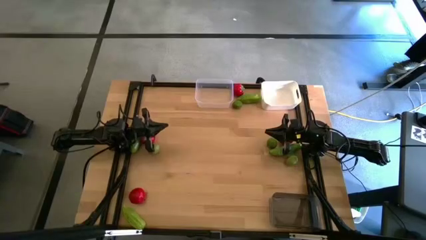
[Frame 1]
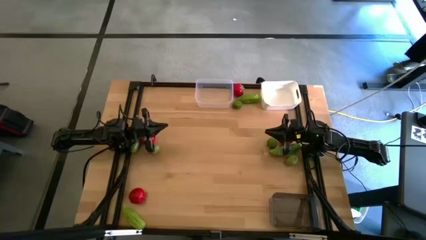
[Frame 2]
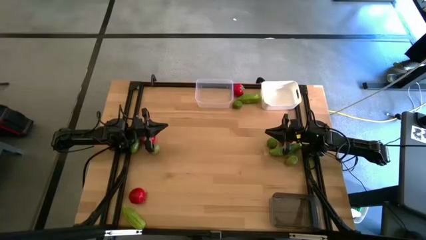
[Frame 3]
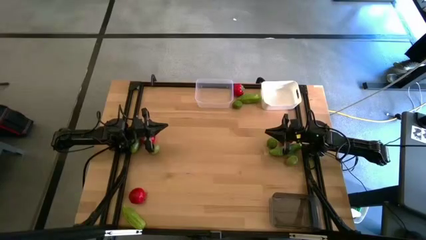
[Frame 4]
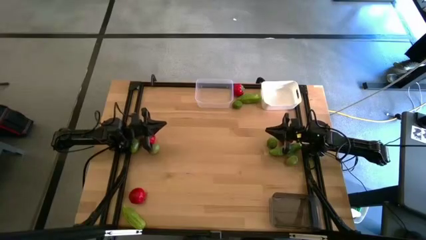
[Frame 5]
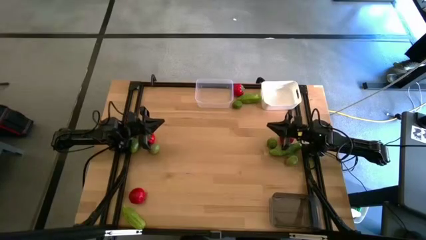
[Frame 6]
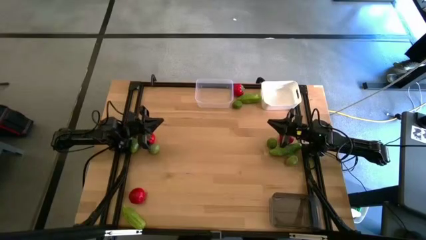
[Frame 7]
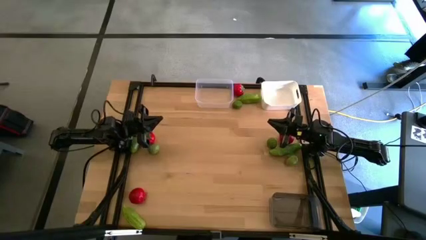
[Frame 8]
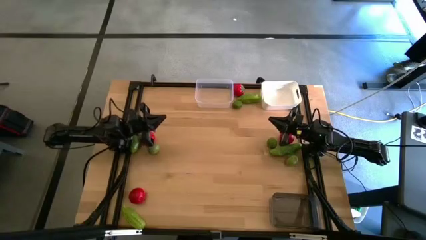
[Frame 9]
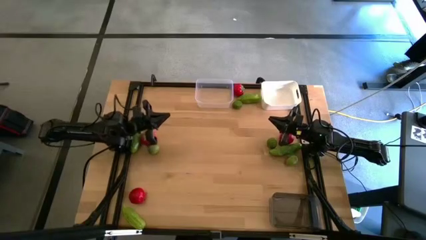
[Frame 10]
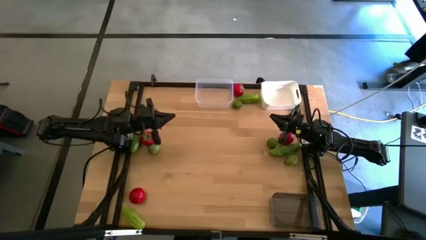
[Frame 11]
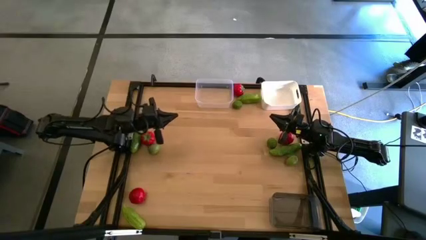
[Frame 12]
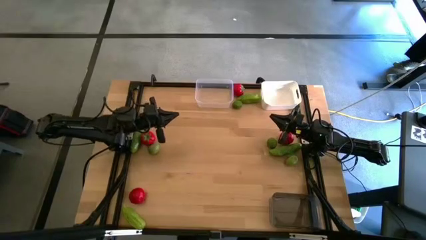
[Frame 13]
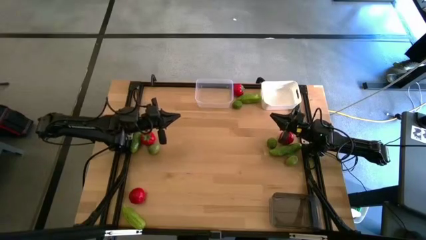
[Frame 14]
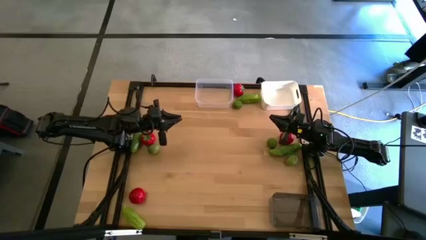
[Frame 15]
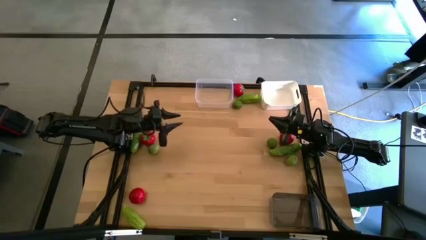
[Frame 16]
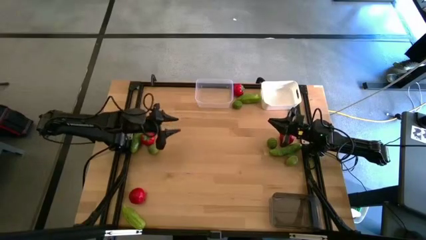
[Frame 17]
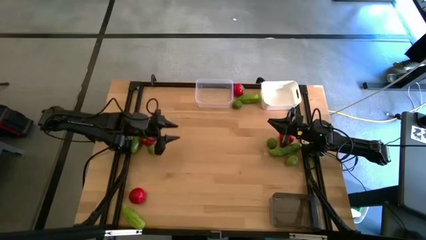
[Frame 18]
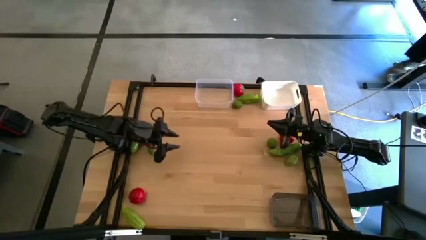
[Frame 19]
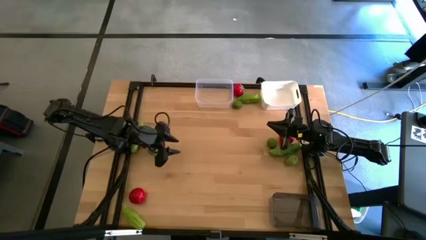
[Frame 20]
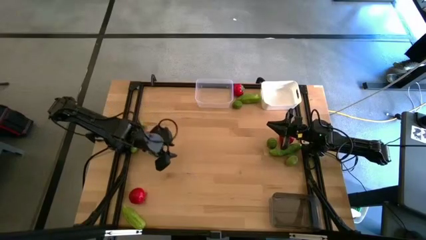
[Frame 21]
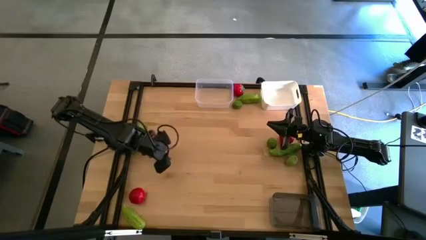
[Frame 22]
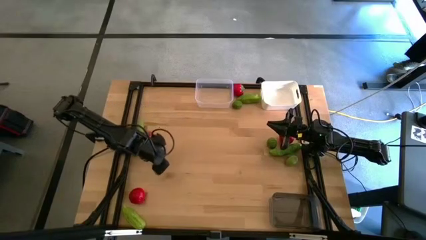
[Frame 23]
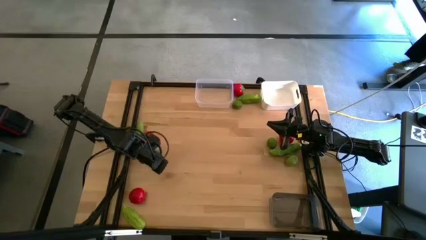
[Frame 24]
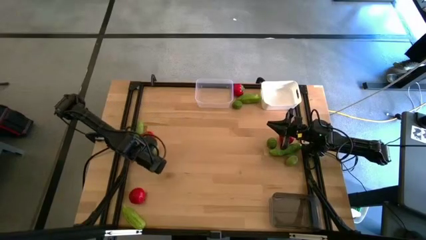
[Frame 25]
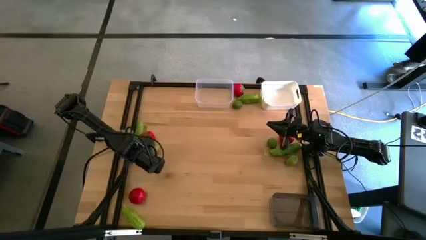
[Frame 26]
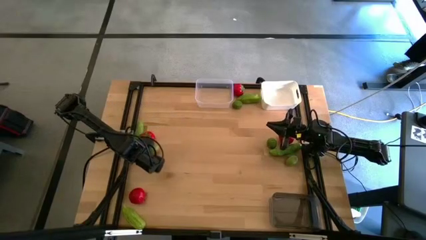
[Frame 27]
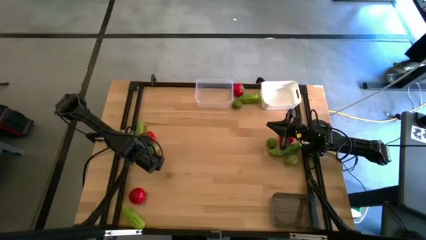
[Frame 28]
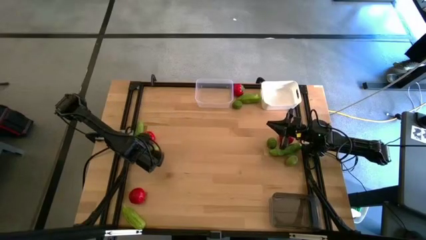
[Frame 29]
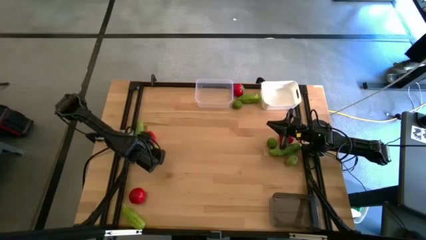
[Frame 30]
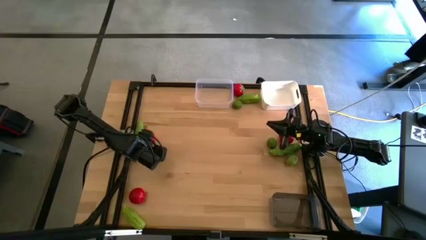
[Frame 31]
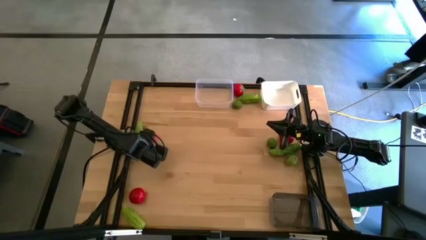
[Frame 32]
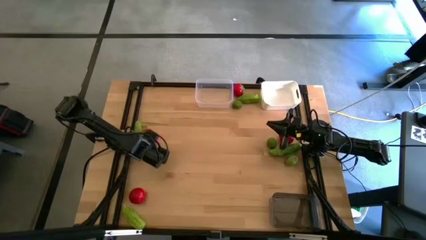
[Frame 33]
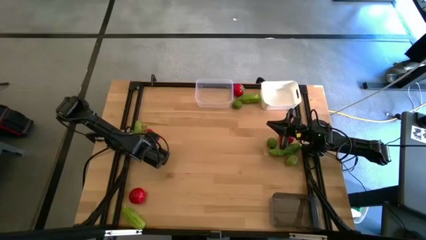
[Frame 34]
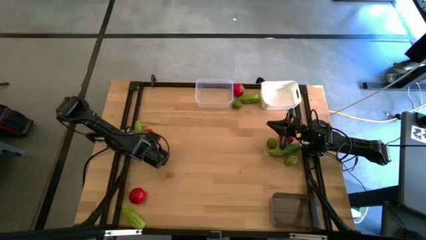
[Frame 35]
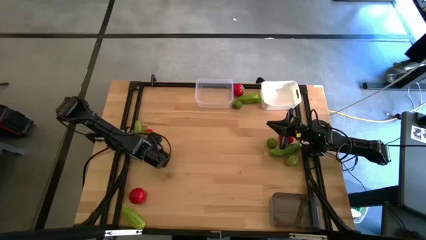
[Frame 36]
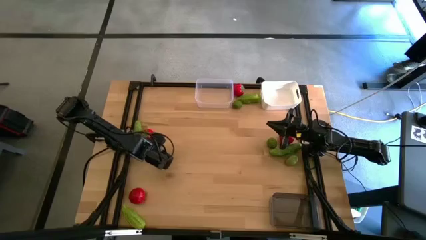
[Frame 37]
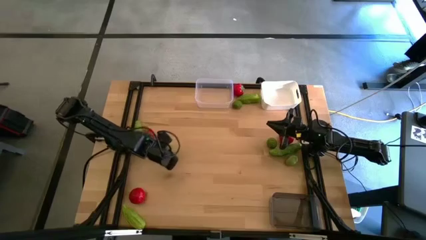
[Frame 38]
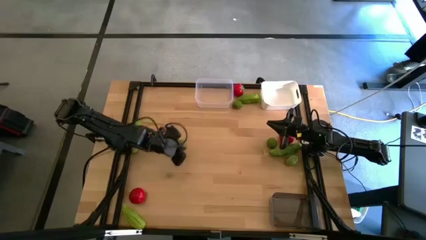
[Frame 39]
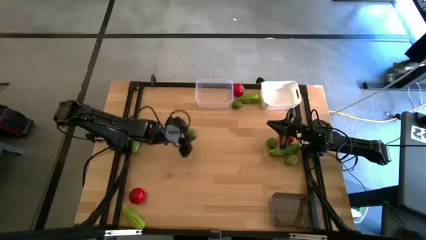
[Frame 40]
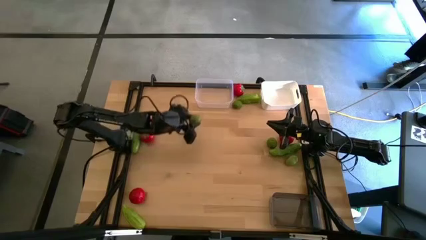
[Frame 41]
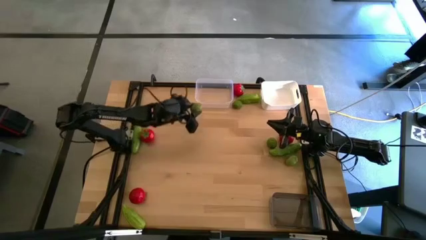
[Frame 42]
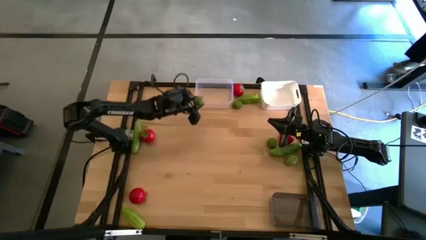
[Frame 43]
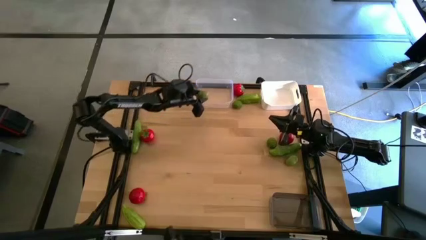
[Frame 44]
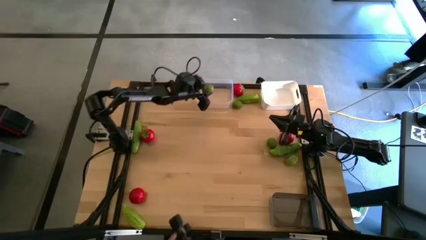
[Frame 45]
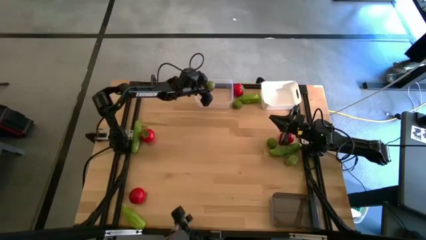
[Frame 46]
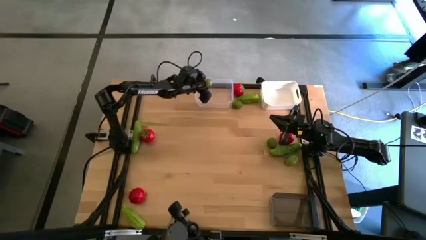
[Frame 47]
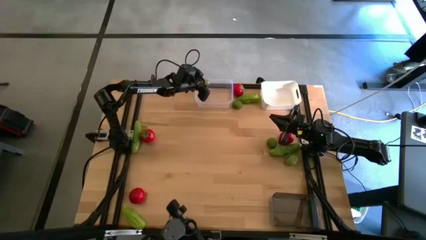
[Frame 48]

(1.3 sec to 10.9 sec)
Task: Sort produce into baskets
Put the green lime into the transparent bin

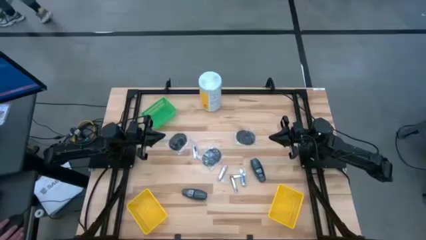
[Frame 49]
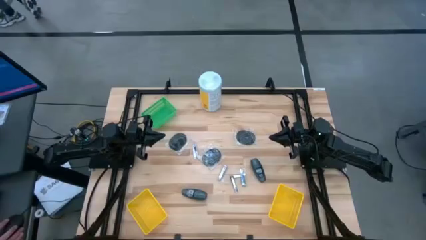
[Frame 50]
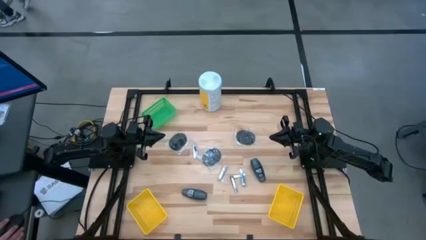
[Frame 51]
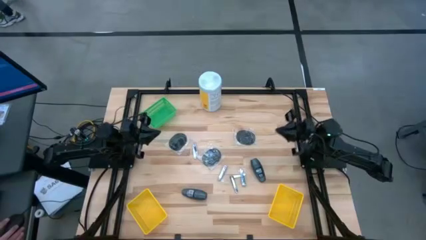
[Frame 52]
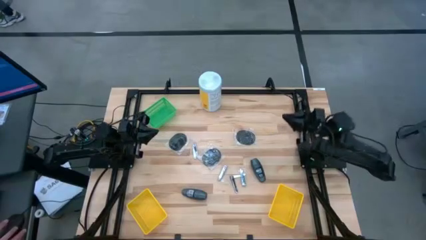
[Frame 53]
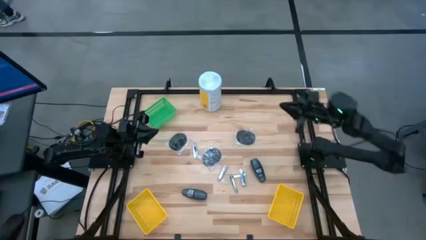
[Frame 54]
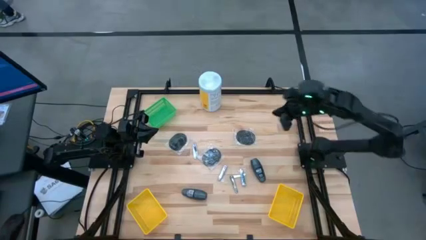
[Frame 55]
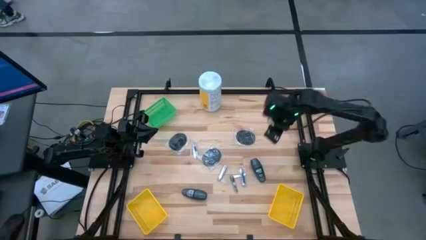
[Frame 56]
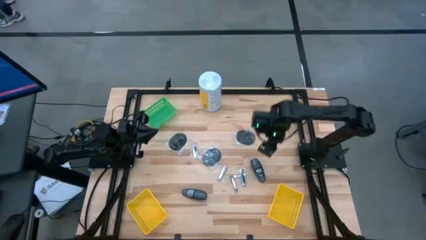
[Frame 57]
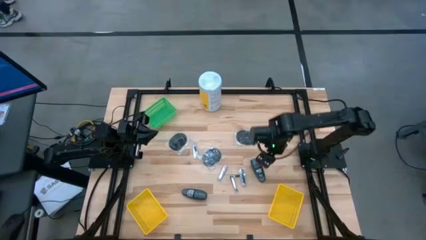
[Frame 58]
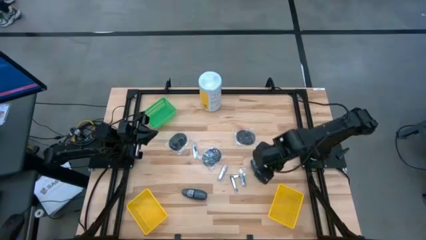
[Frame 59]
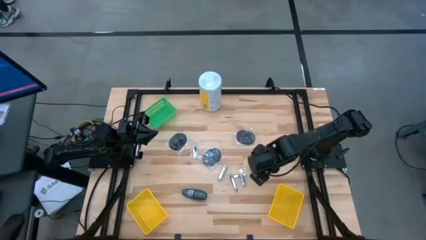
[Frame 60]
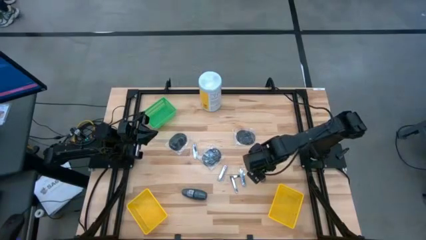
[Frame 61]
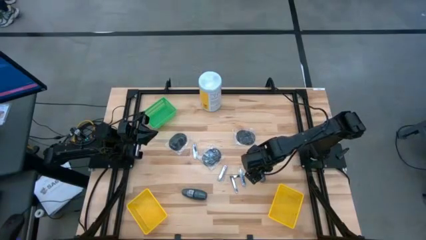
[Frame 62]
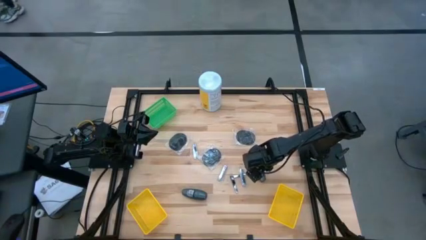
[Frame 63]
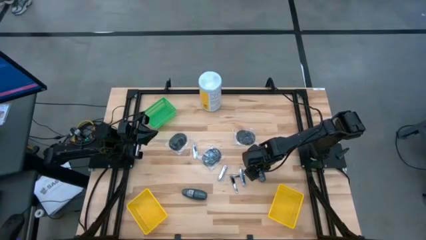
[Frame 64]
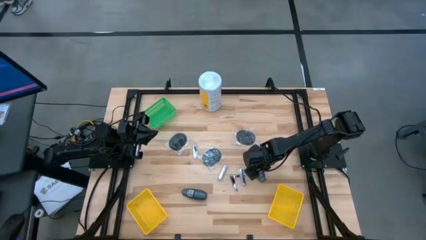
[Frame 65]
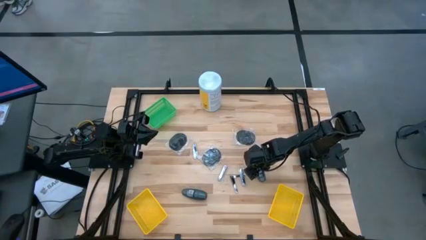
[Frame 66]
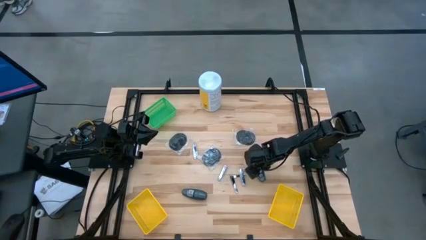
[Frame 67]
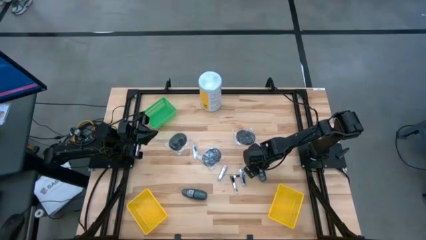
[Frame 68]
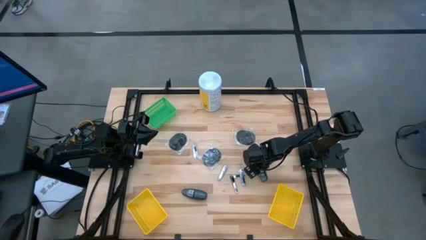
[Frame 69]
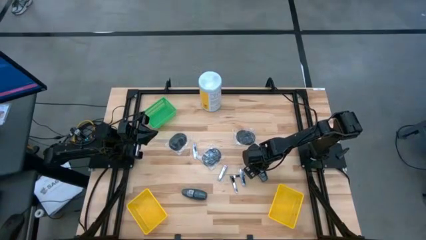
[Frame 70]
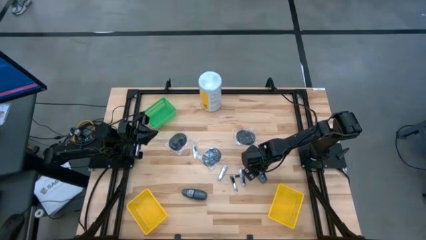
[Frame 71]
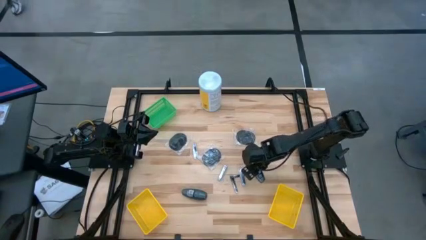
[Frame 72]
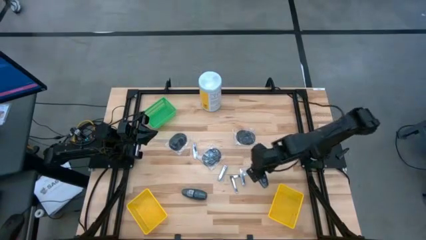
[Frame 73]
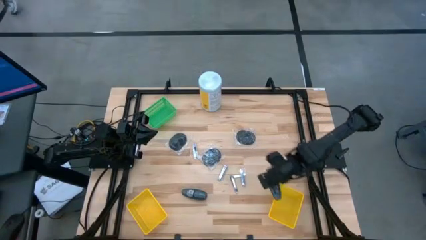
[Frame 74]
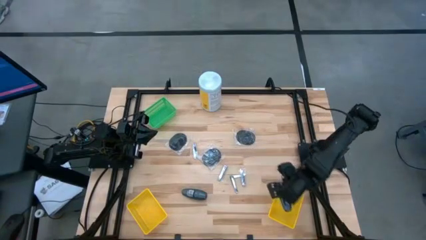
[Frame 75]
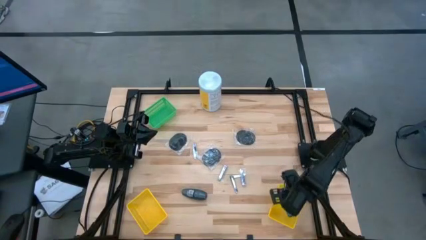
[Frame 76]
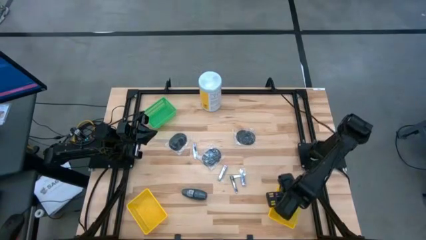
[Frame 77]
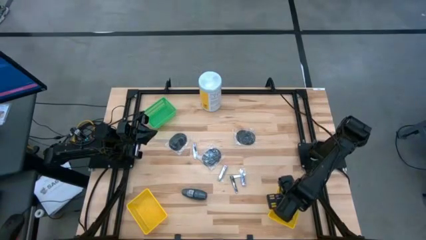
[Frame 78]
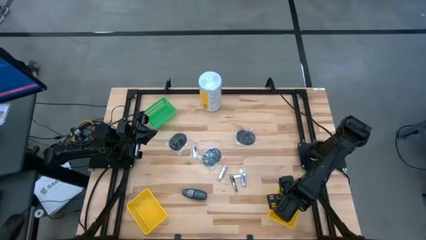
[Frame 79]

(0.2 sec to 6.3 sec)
Task: Pick & Place Travel size toiletries
Put the gray deodorant into the right yellow bin
